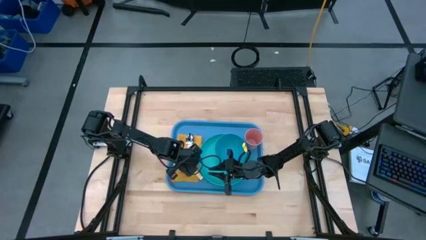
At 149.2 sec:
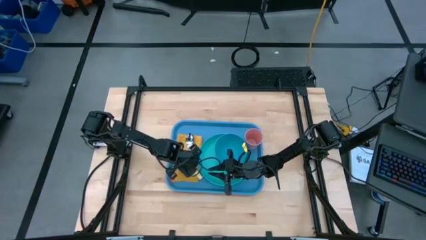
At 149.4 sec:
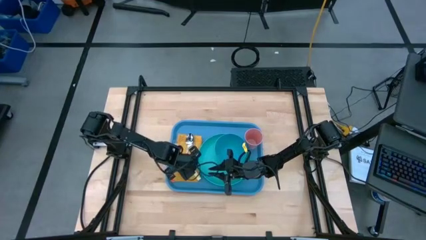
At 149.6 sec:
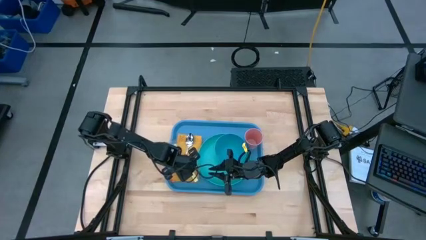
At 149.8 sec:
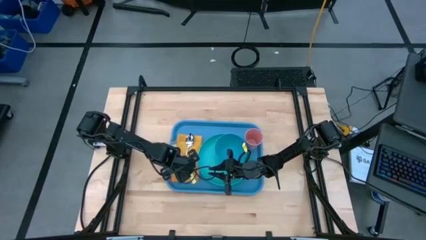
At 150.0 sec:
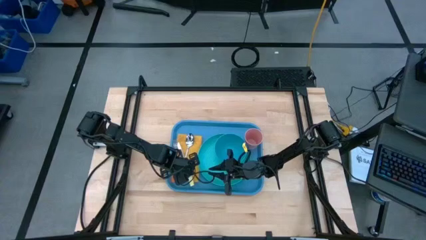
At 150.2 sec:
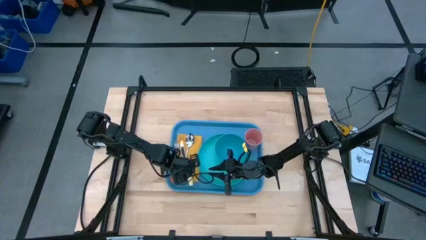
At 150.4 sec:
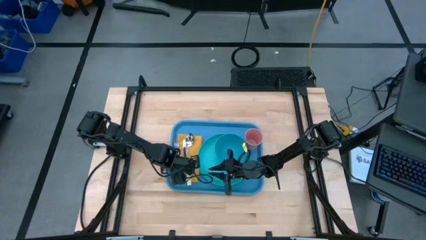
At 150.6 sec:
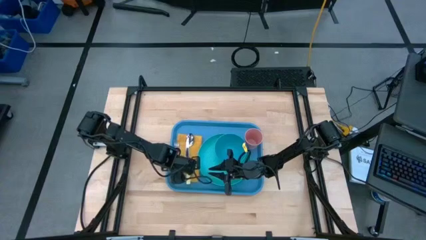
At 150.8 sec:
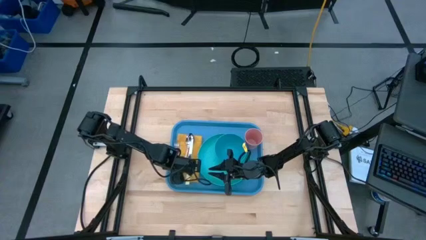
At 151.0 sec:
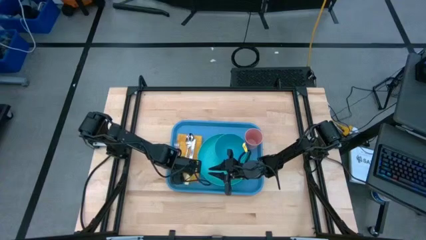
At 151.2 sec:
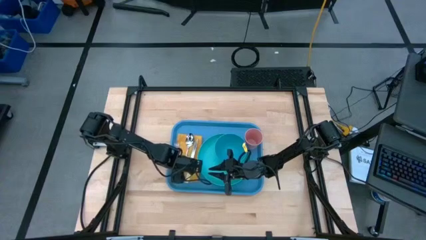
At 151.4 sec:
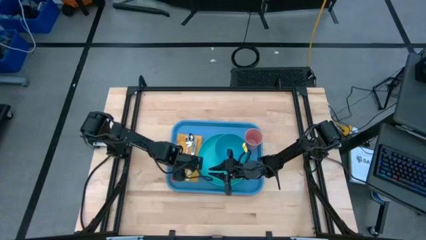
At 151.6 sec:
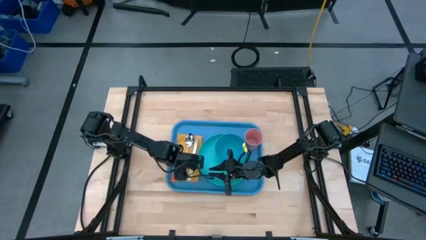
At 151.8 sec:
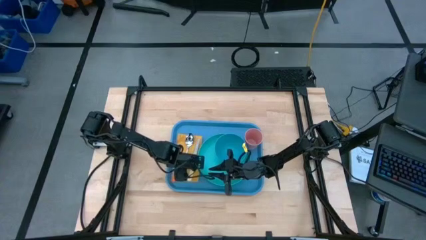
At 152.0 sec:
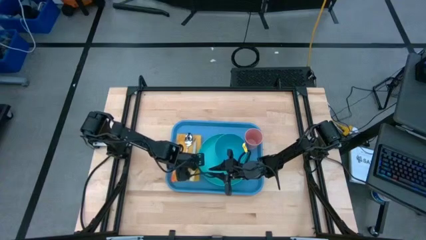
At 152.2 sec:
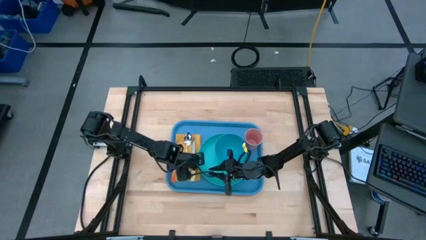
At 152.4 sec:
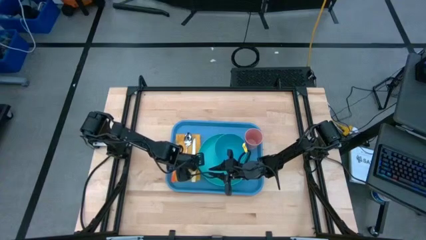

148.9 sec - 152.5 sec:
Task: Set up tray
Put the knife on the yellow napkin

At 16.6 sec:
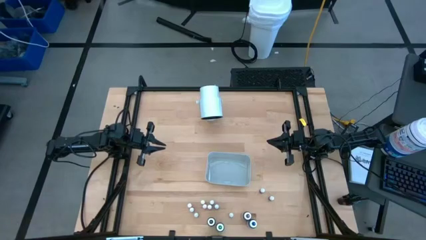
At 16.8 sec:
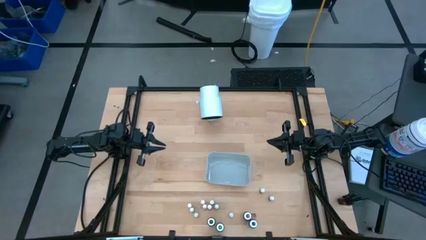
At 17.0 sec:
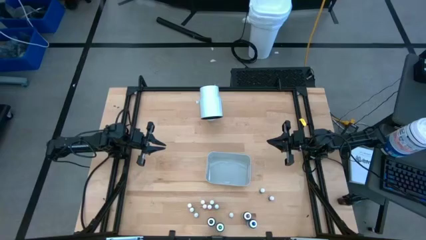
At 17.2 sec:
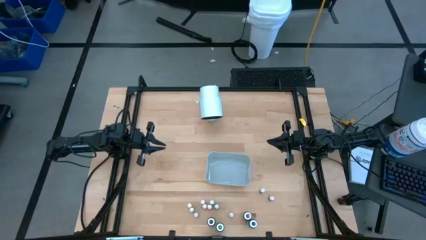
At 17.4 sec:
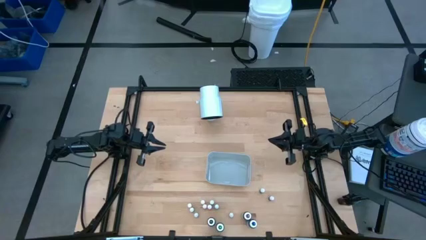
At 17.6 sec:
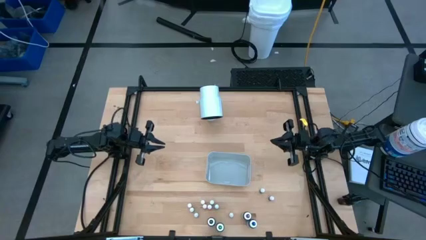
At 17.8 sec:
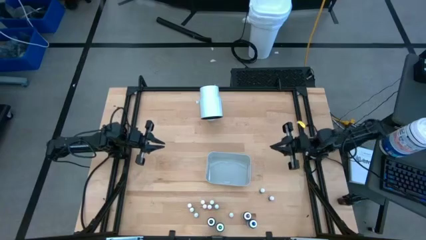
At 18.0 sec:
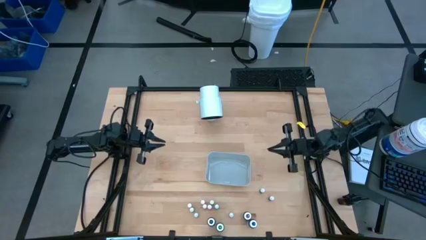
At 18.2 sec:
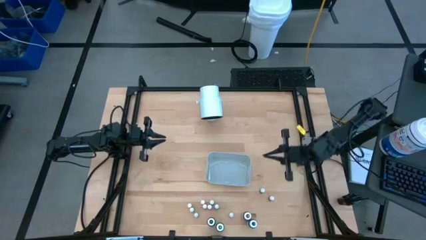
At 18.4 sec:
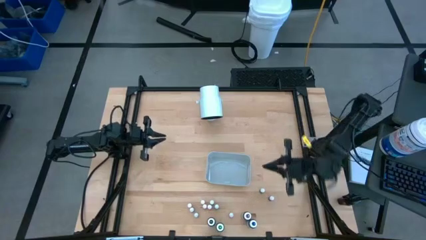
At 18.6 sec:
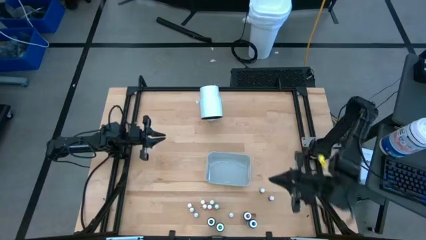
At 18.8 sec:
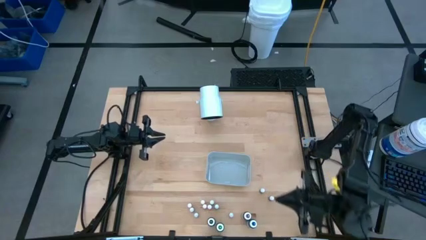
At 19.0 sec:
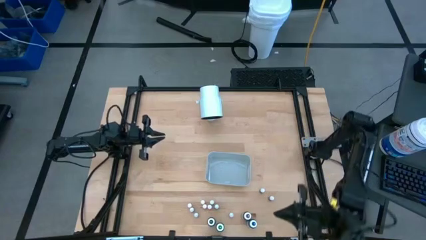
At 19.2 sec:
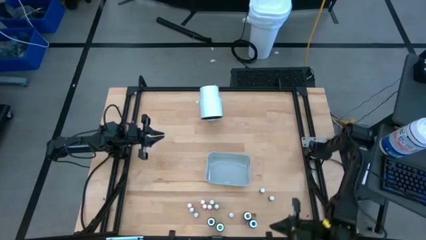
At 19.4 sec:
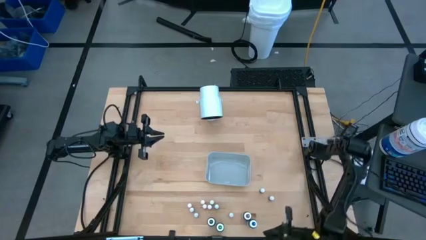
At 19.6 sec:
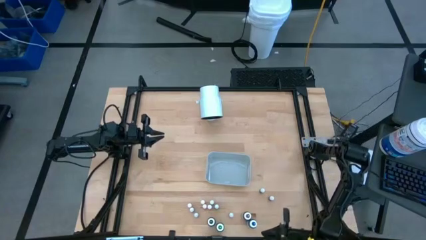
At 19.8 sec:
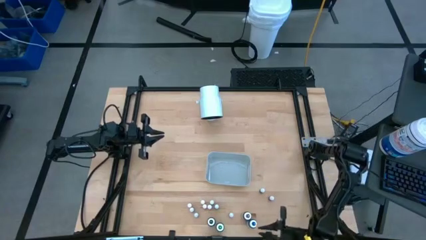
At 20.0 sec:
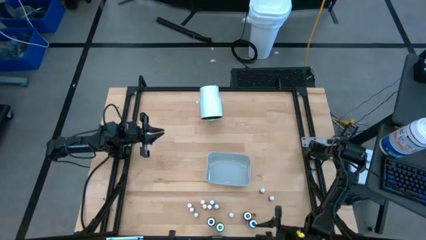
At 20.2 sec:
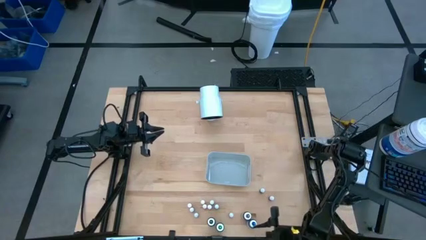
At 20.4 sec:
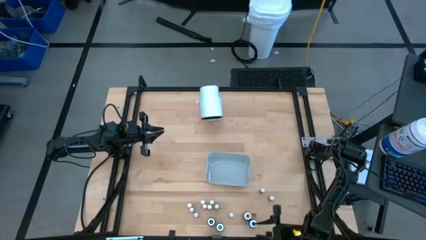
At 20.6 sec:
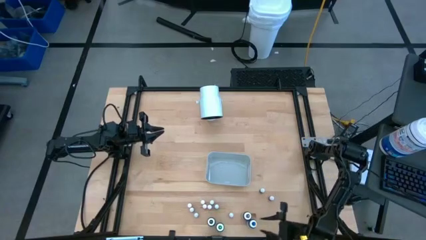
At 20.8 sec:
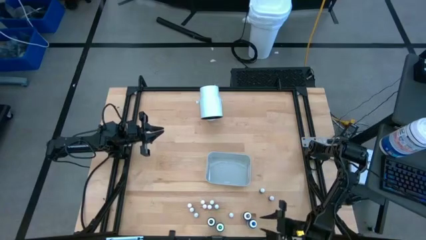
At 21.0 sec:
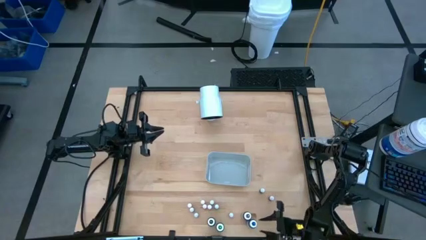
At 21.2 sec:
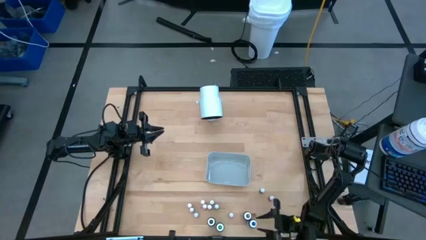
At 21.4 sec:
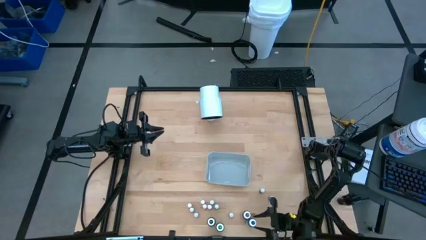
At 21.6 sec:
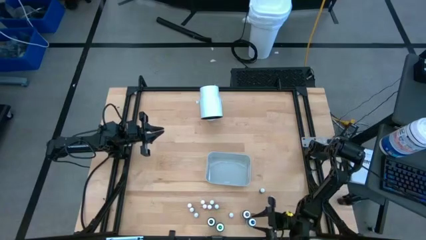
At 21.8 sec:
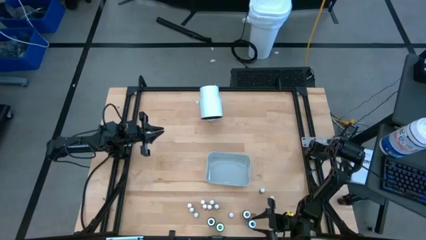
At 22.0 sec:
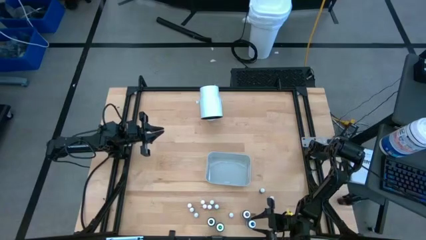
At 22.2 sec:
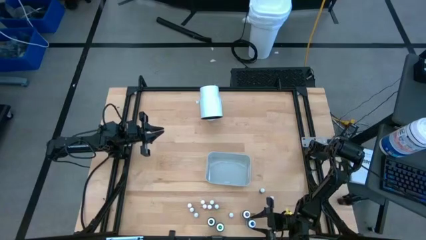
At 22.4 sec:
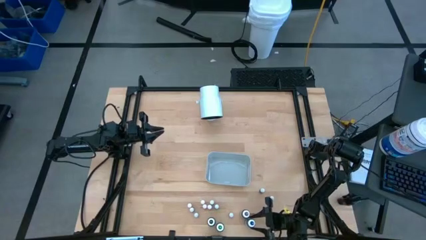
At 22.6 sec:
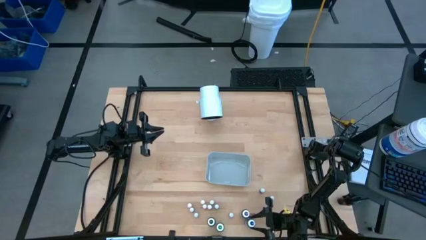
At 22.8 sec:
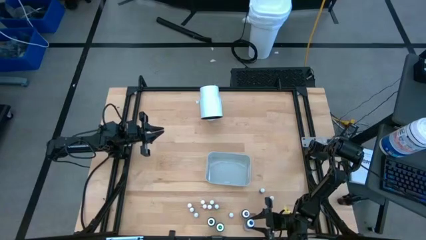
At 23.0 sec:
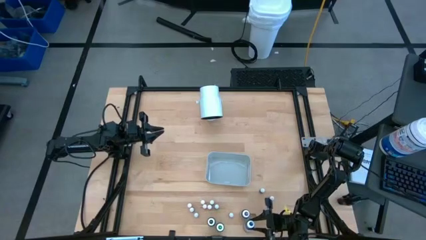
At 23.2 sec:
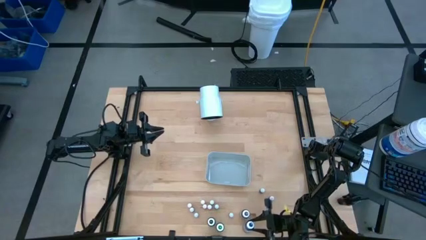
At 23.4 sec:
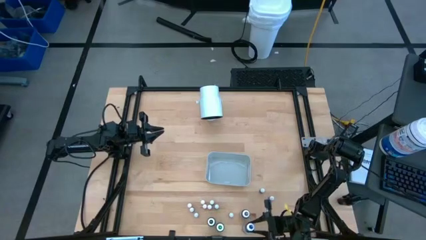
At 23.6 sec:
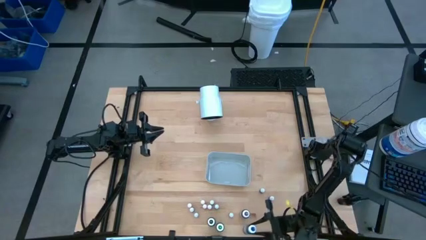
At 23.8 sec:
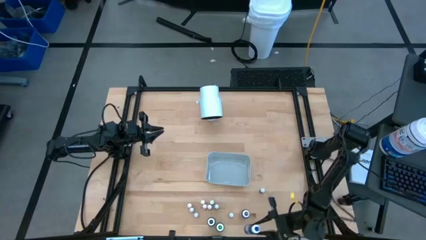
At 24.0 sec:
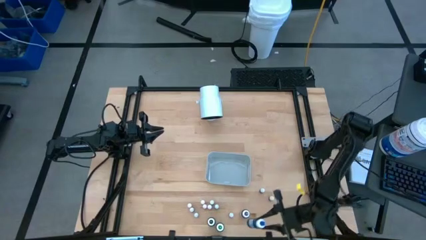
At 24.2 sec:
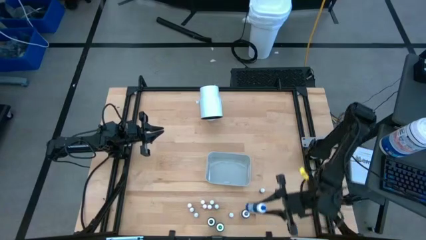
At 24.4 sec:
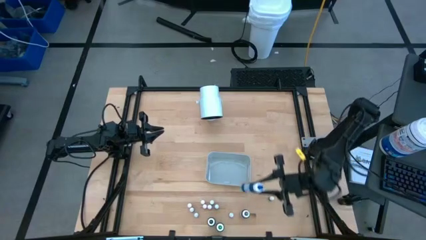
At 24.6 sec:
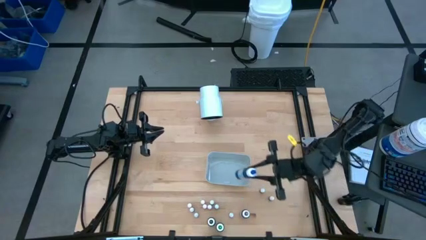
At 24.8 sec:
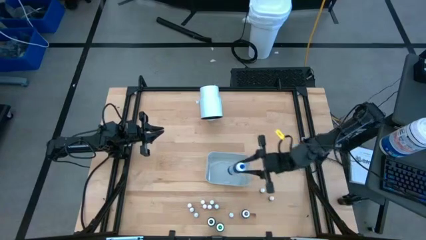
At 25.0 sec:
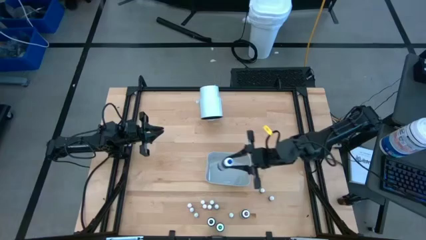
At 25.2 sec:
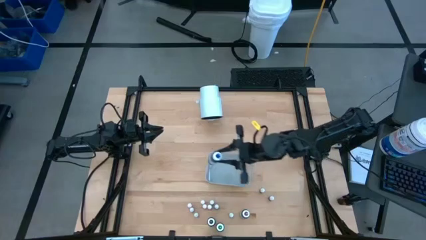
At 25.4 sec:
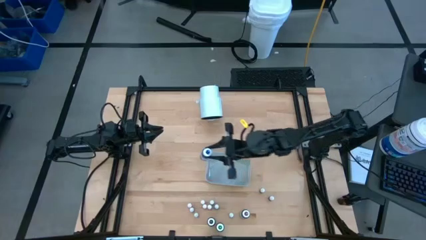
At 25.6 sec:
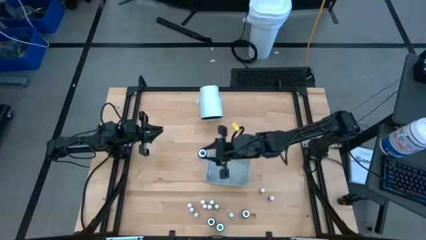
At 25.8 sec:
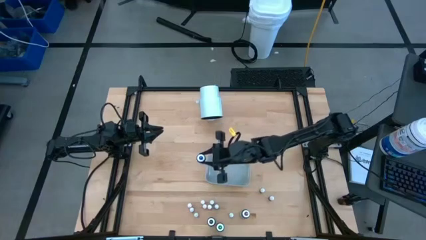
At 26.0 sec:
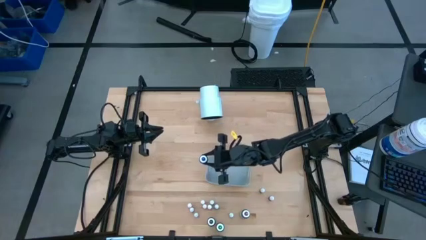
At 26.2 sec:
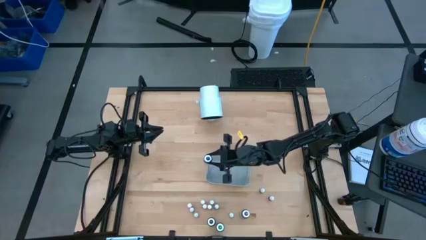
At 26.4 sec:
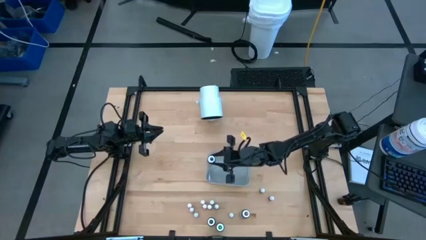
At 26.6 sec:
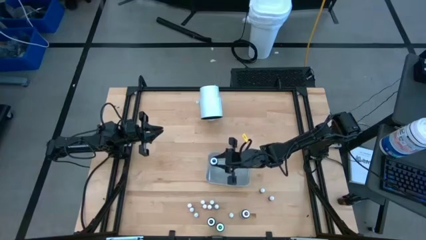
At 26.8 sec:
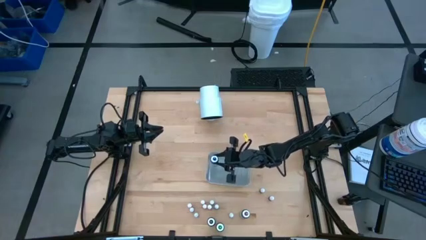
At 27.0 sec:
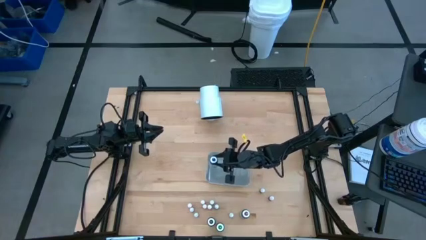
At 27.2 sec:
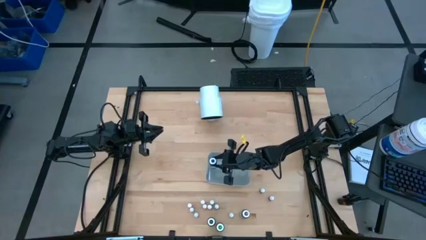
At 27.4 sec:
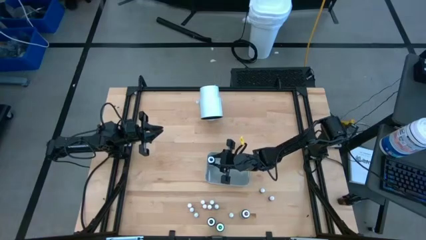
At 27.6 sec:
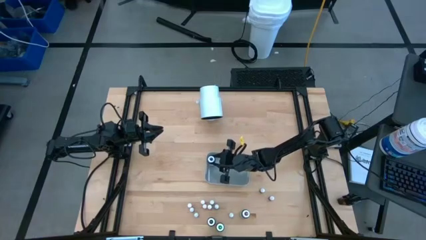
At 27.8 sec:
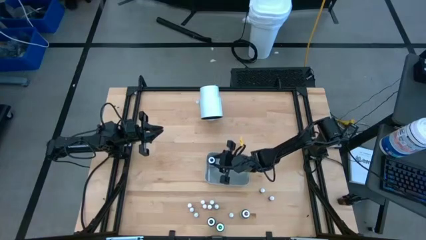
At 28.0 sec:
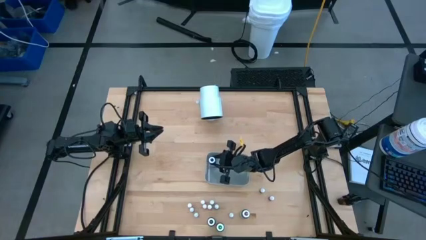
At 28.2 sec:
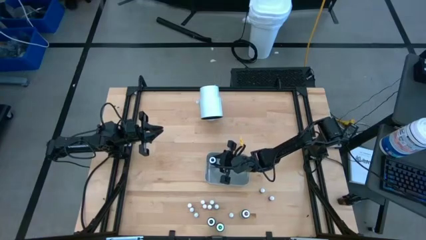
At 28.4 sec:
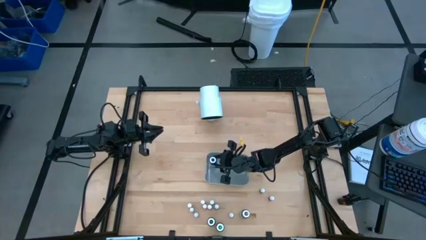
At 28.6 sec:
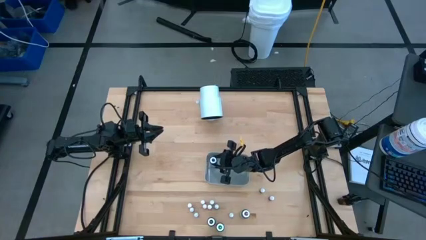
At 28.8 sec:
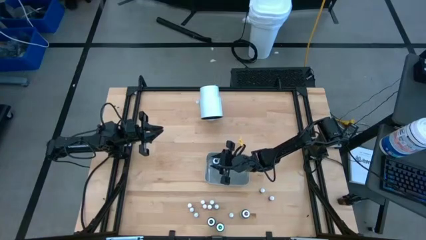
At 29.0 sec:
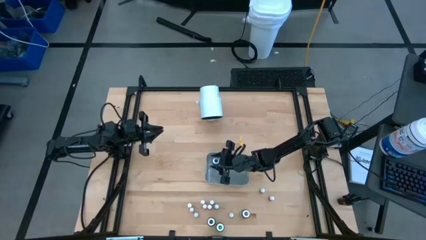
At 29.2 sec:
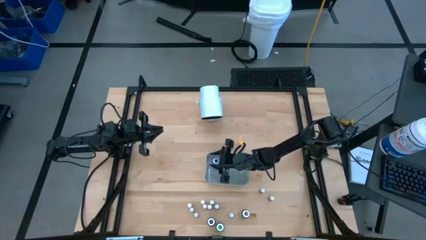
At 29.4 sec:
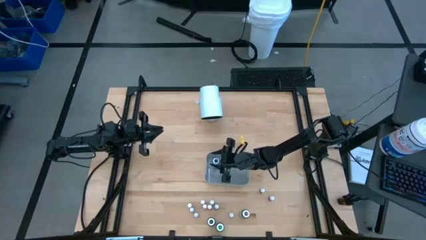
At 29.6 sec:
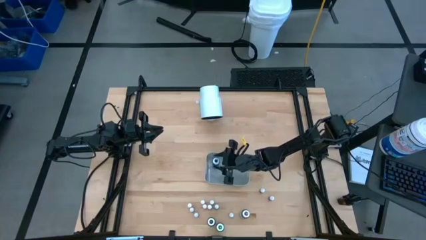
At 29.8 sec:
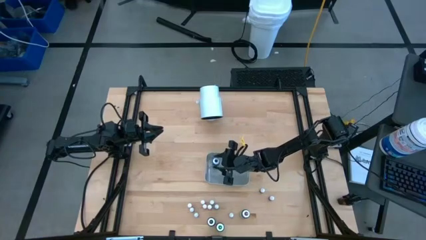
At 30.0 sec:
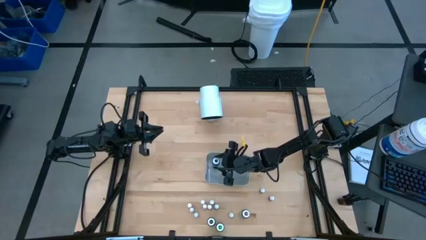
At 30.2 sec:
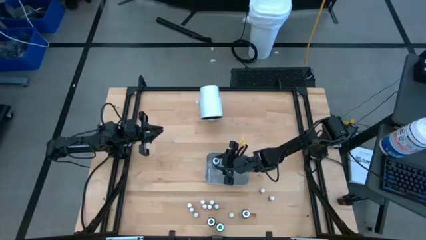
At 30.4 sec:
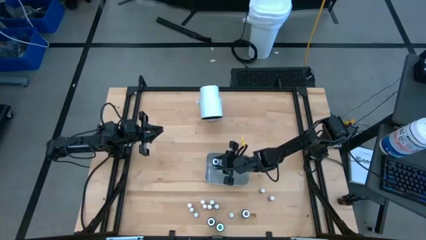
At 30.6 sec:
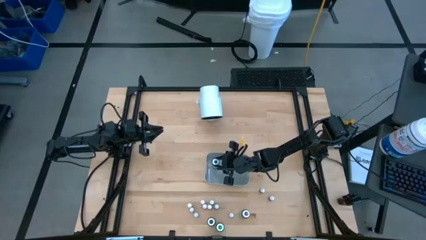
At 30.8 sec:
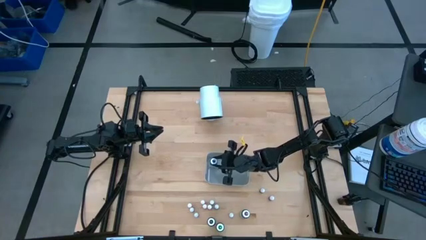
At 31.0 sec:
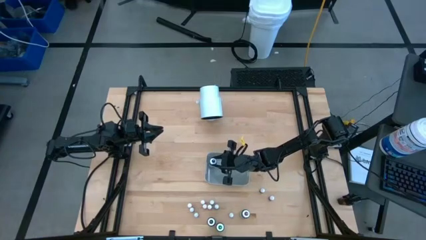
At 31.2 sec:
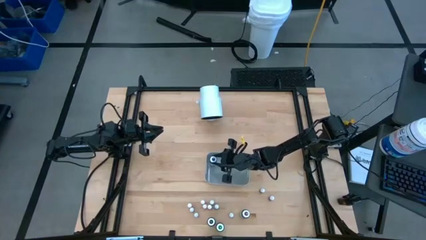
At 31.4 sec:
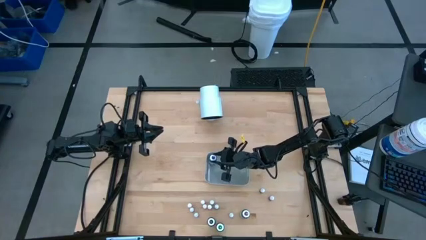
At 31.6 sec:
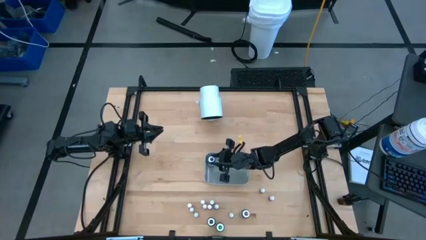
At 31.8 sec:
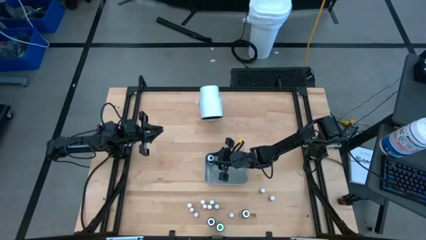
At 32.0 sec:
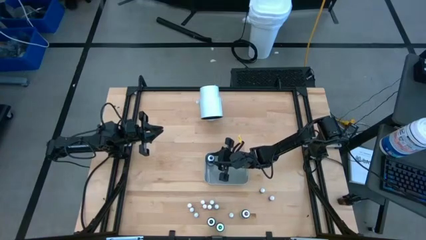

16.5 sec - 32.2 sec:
Task: Pick & Place food coloring
Put the large blue food coloring bottle into the gray bin
